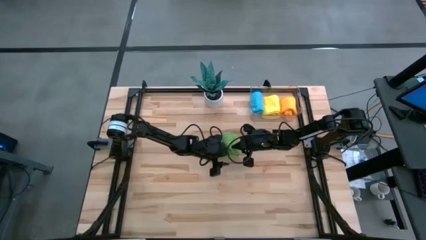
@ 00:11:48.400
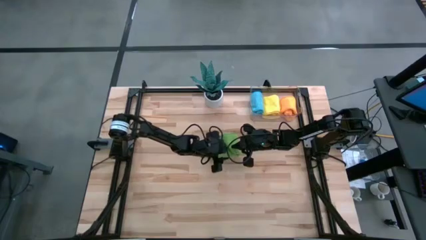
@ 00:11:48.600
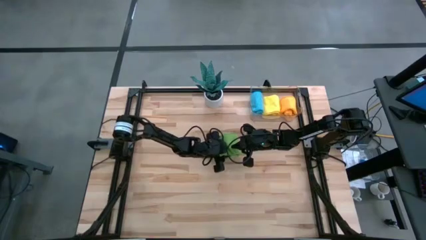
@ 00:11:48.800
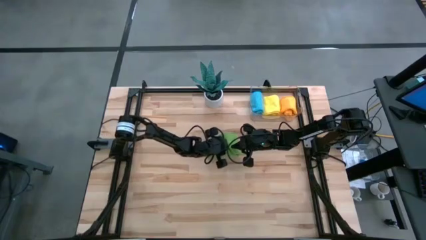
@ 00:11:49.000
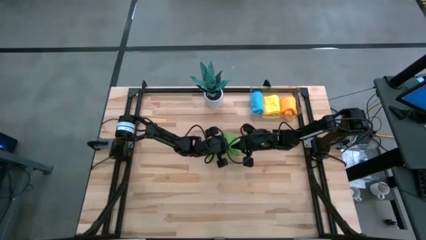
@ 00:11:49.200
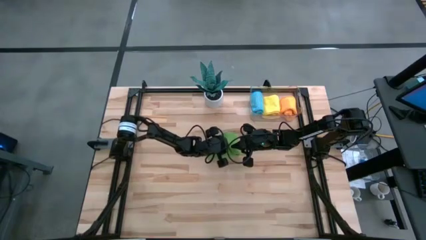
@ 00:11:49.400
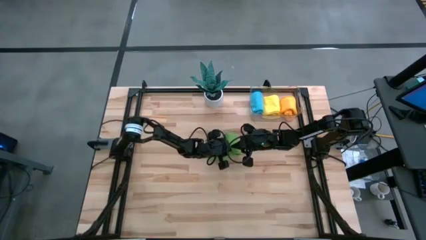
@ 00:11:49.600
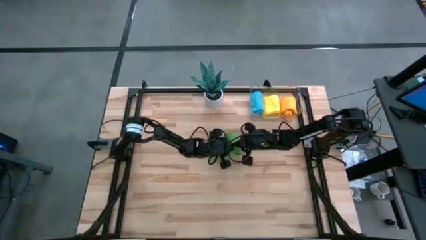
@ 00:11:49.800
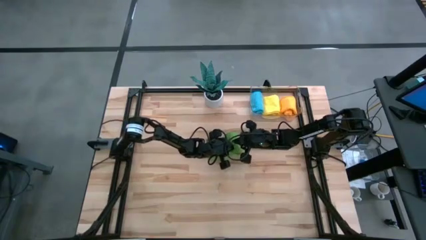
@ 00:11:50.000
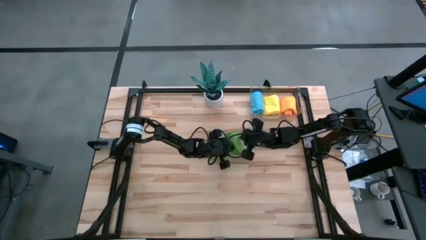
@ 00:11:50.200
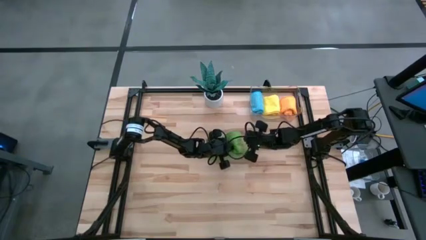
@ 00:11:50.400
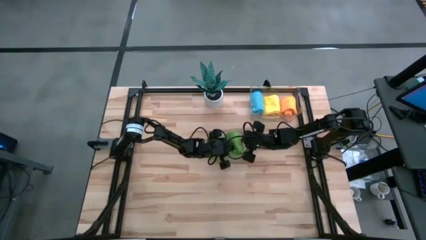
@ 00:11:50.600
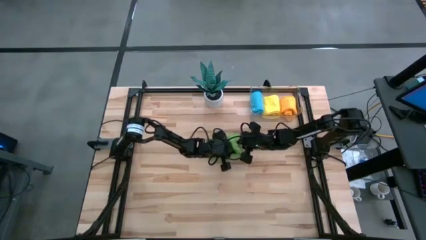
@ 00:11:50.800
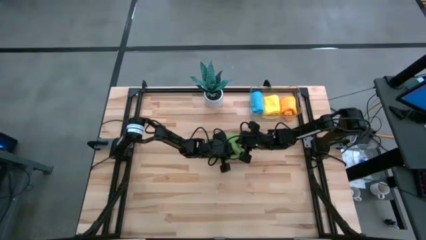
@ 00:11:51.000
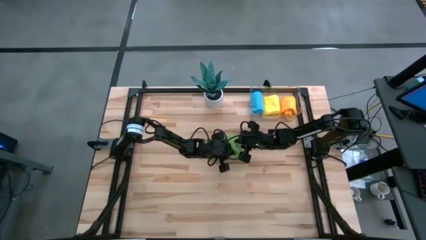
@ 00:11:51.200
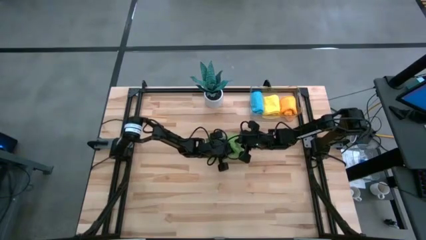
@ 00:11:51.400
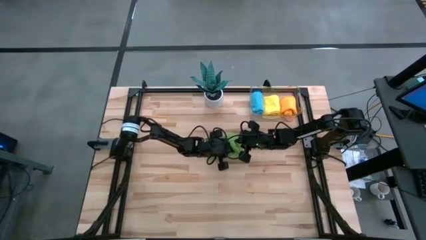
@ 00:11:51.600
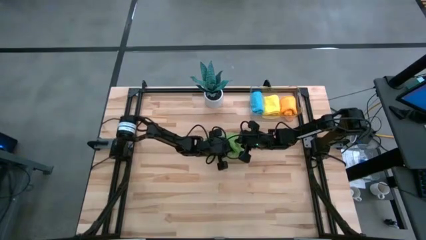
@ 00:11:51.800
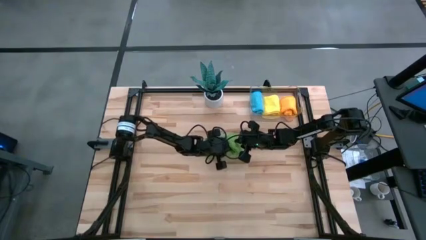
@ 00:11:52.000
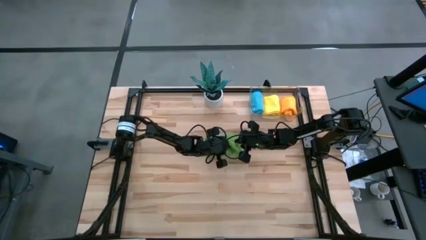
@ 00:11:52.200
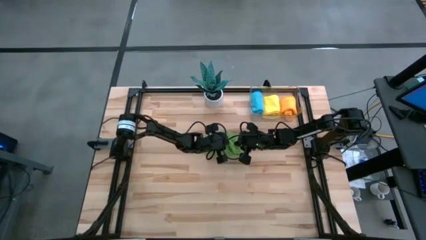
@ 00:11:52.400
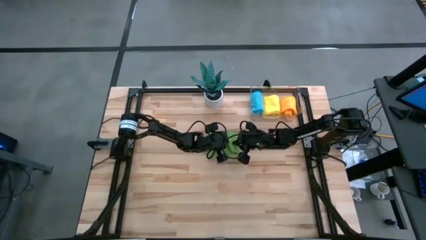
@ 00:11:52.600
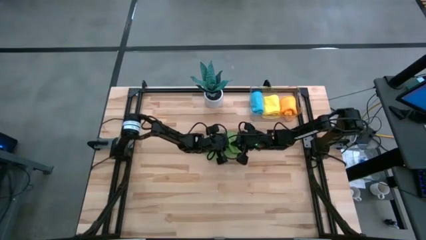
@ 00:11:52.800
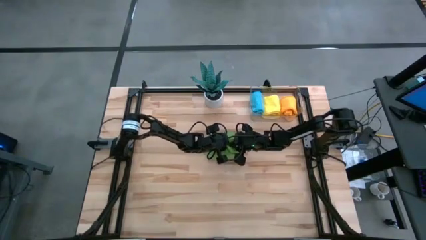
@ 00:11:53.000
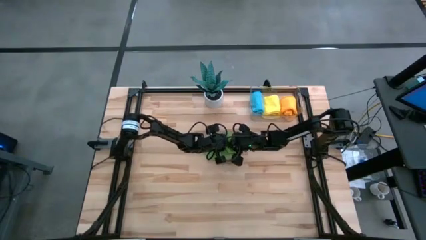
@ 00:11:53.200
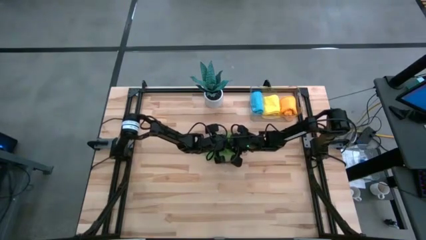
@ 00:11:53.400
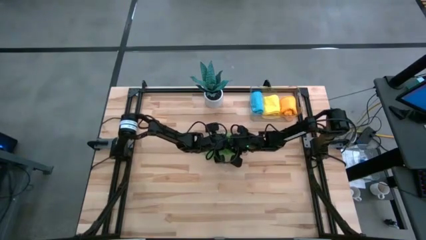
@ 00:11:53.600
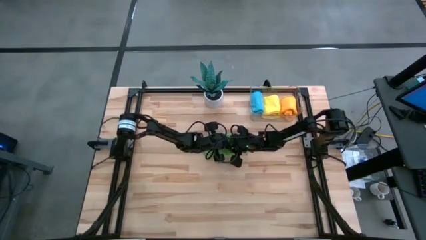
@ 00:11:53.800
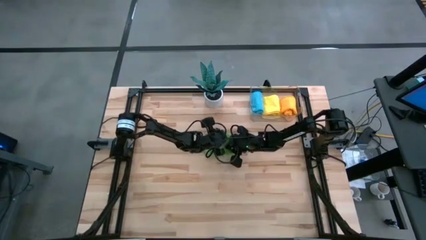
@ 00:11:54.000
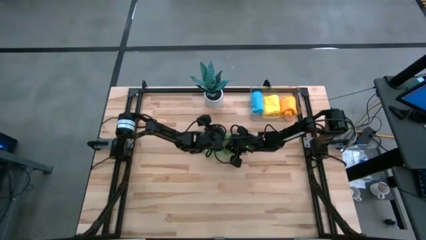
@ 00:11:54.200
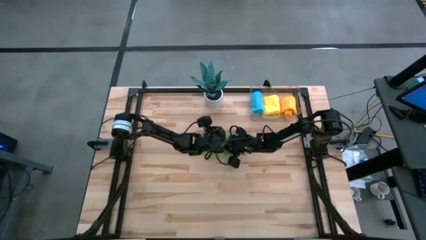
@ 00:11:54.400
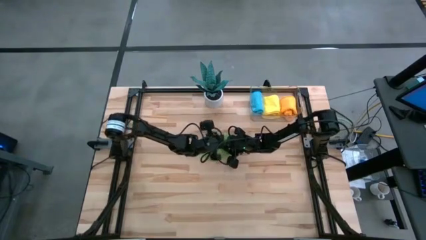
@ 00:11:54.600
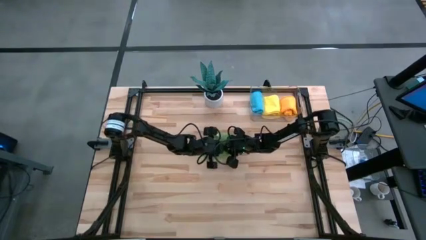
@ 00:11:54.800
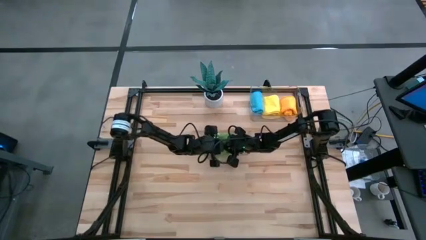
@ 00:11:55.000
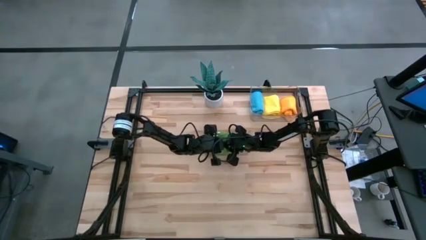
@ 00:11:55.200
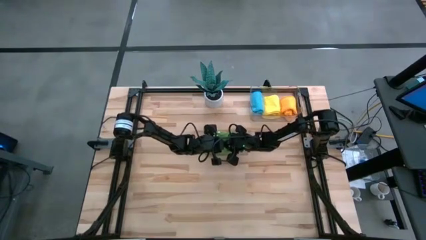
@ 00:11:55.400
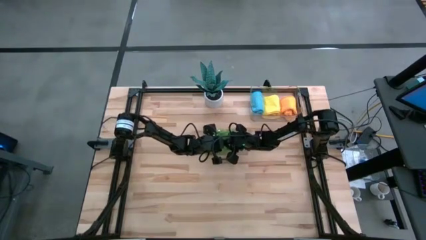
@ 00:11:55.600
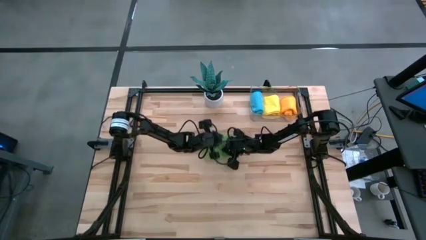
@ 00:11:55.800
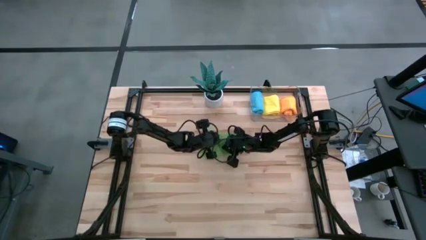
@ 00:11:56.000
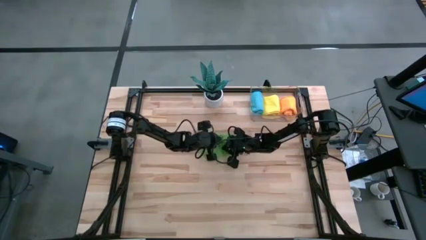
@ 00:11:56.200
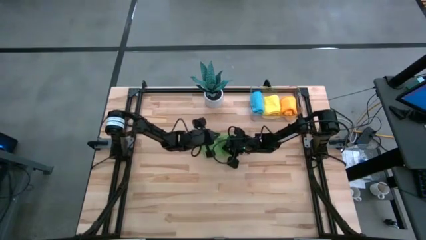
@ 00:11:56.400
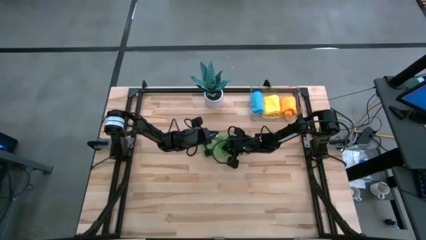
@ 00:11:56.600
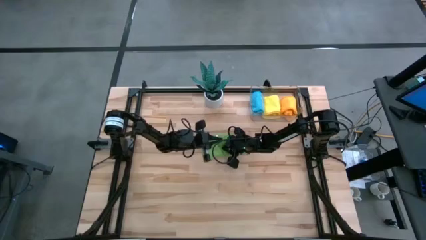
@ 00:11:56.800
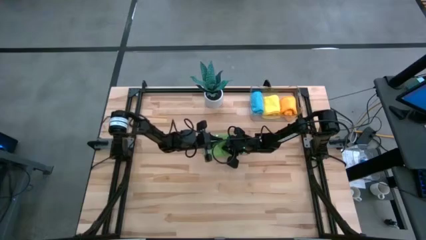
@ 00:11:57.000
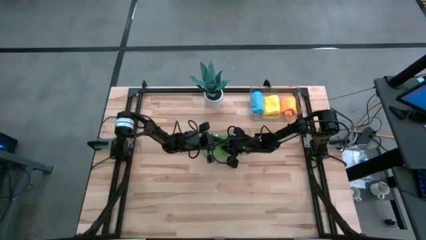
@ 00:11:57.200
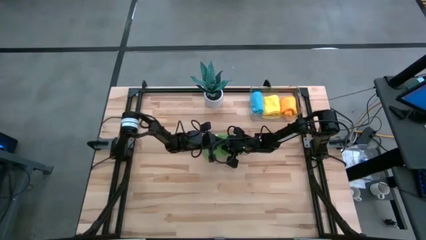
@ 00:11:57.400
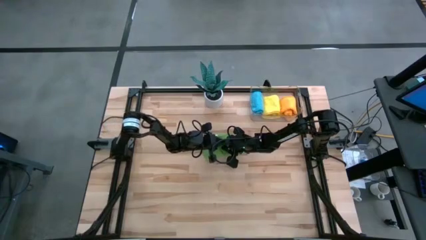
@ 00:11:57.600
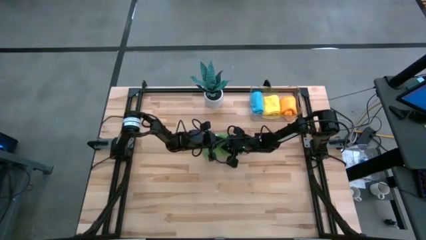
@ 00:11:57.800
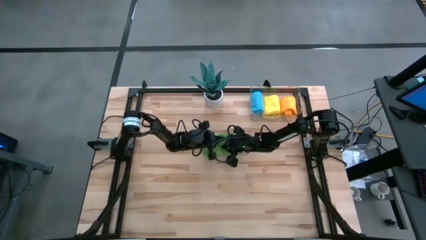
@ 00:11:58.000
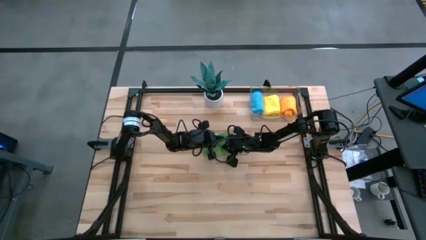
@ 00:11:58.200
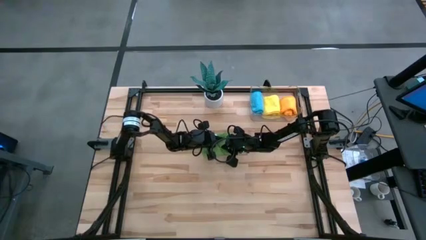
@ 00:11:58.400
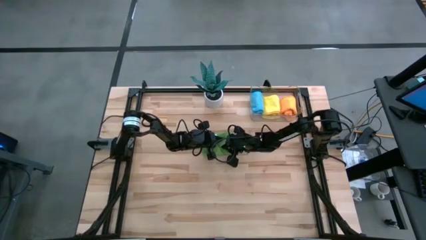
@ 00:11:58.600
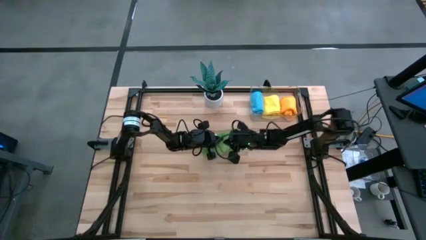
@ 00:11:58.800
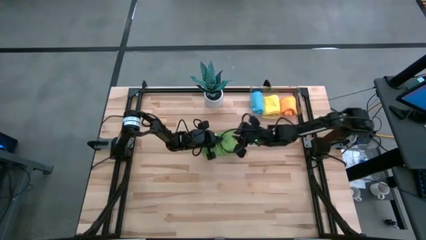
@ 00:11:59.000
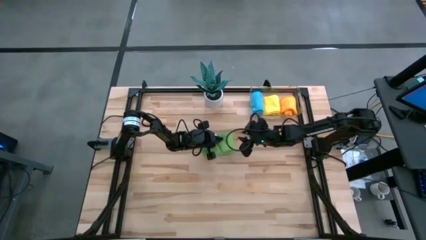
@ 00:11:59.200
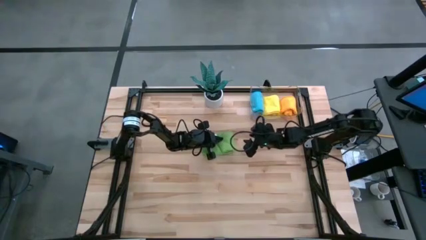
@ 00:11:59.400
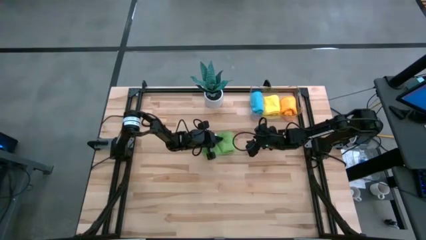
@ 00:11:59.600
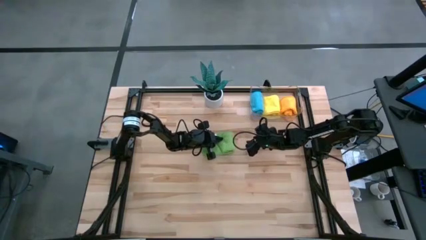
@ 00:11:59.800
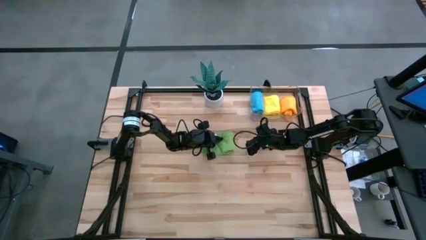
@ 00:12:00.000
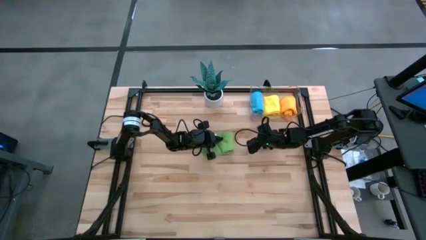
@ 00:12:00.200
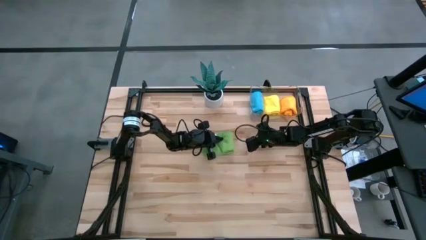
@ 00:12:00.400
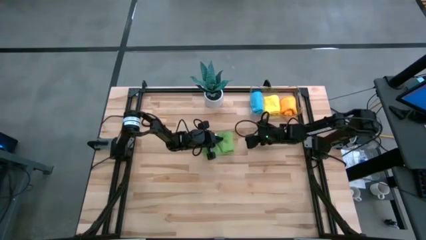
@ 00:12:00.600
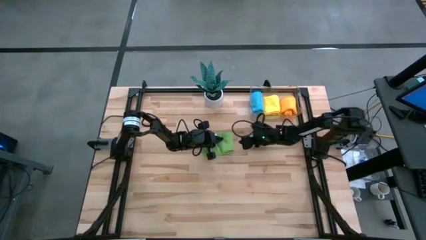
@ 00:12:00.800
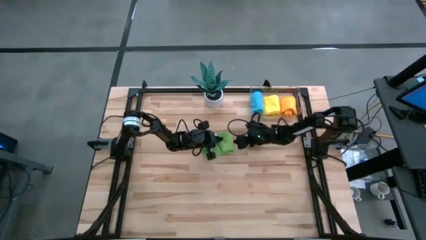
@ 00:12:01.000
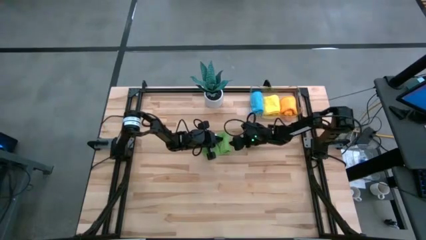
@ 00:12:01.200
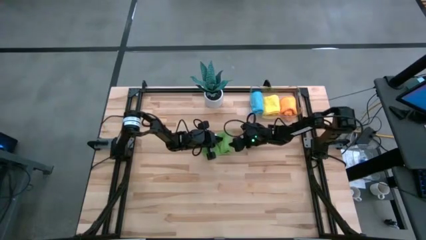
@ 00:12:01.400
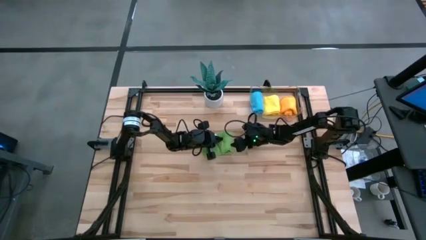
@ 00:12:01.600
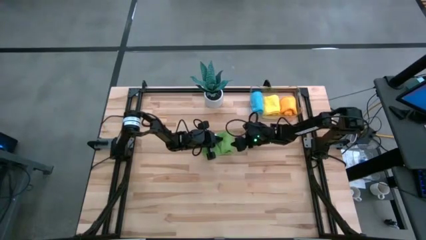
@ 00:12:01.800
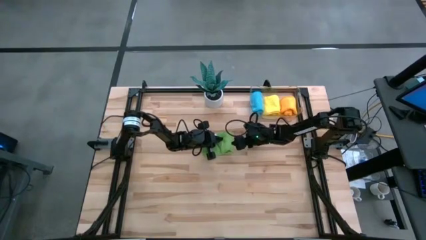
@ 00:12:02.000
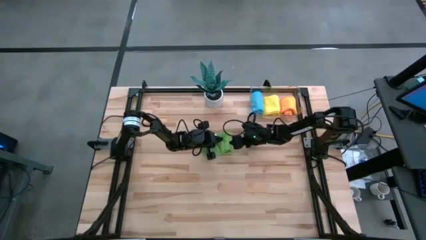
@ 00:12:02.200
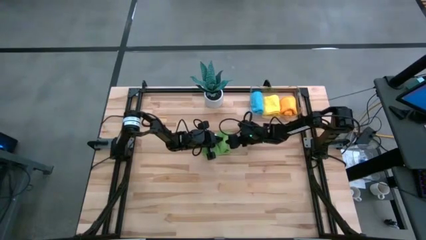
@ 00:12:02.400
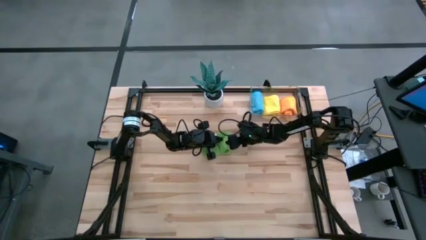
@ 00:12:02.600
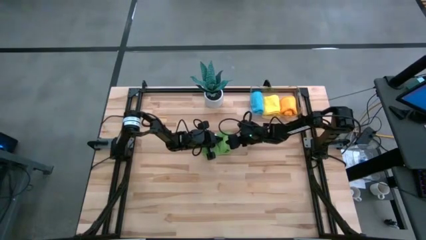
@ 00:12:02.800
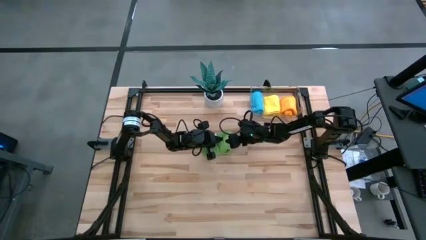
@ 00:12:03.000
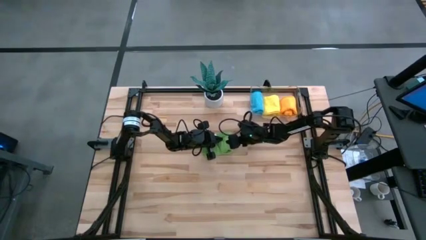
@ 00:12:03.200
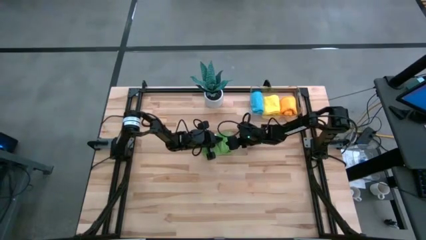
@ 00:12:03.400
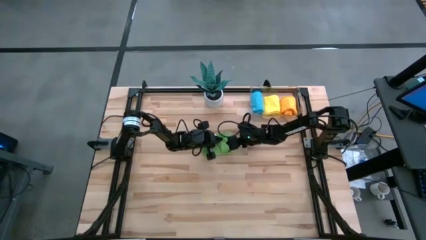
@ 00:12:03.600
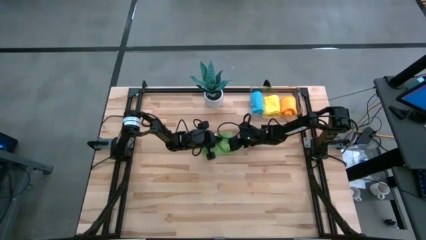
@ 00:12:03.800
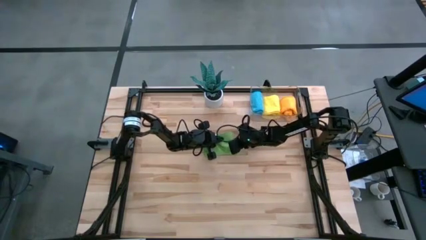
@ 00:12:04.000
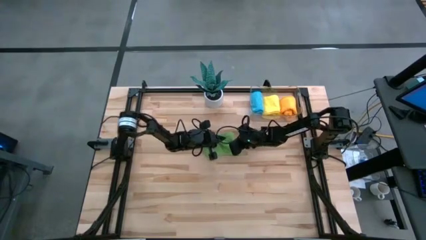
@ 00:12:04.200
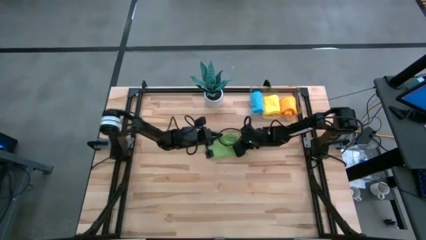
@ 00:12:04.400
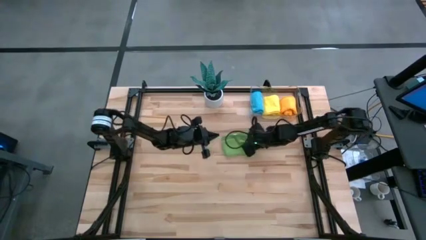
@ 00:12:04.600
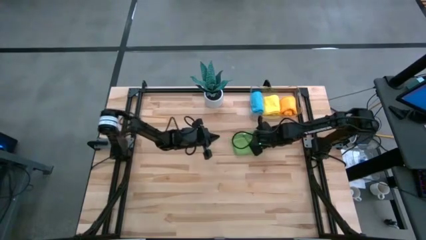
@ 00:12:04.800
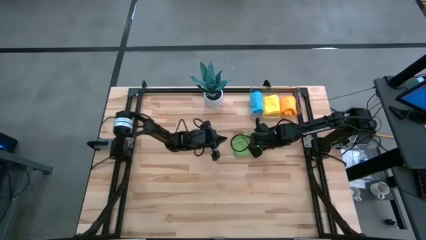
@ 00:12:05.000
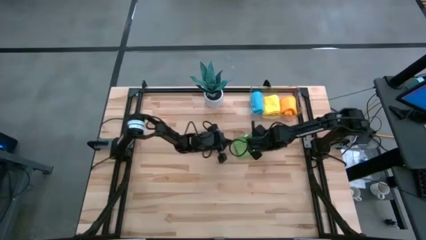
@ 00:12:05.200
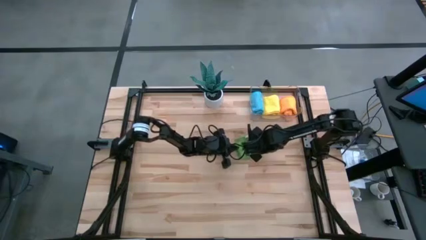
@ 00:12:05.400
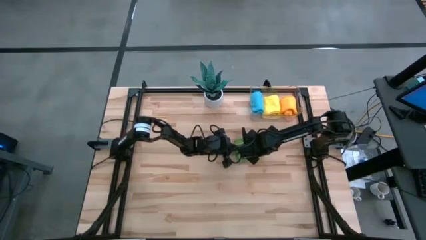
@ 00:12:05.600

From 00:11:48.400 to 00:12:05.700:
Task: Roll microfiber towels into tight, uniform cylinder then place into a basket
Roll the green microfiber cloth
